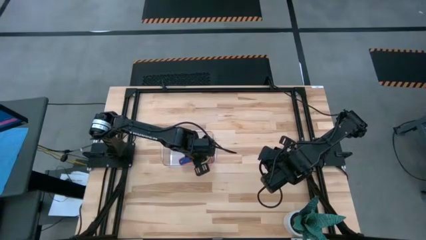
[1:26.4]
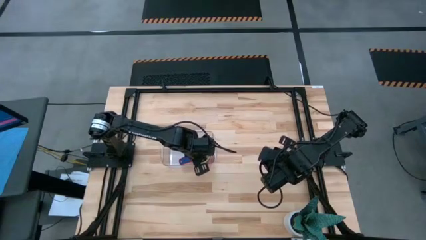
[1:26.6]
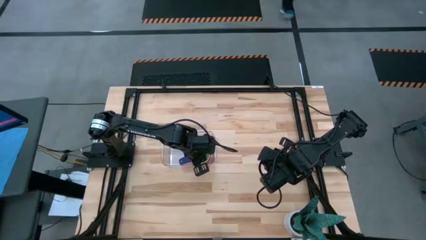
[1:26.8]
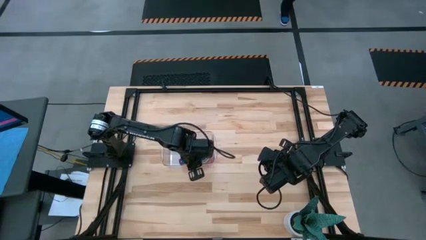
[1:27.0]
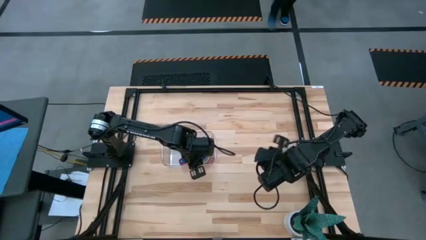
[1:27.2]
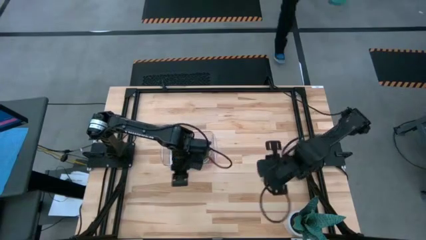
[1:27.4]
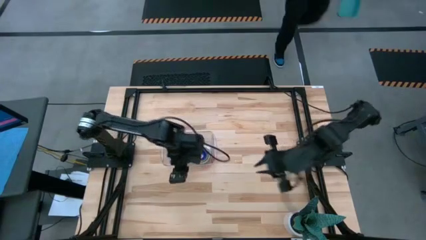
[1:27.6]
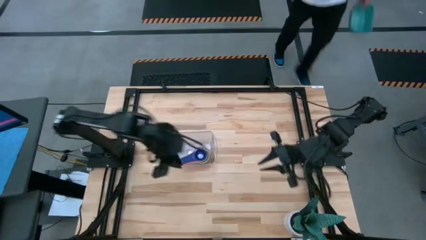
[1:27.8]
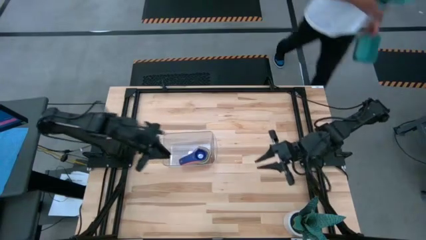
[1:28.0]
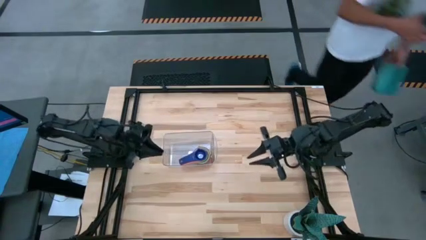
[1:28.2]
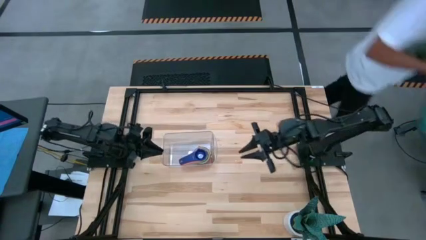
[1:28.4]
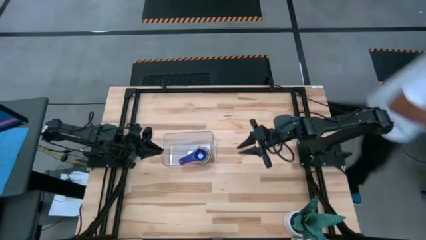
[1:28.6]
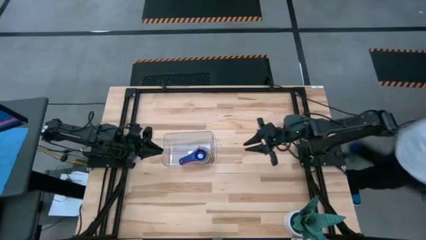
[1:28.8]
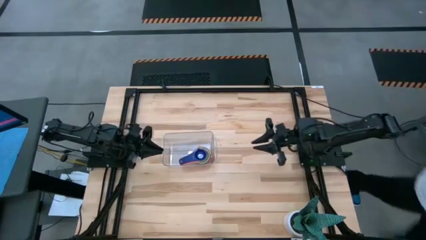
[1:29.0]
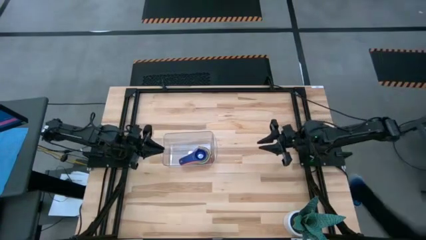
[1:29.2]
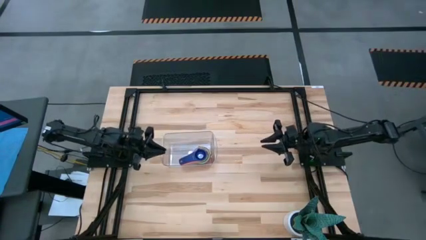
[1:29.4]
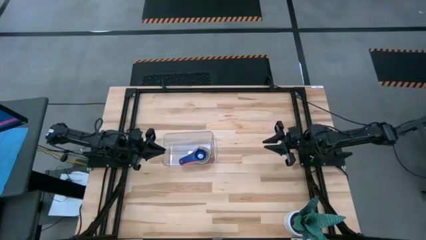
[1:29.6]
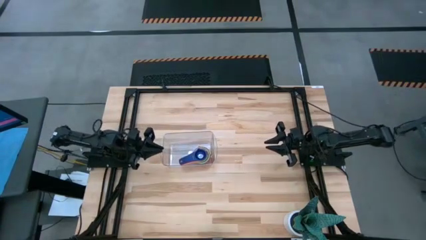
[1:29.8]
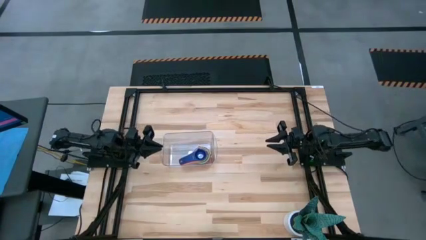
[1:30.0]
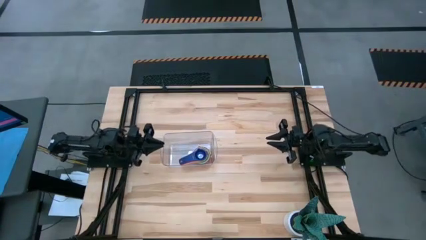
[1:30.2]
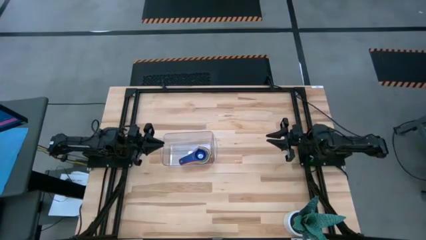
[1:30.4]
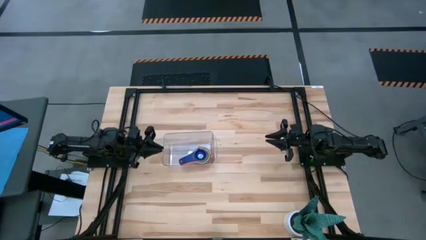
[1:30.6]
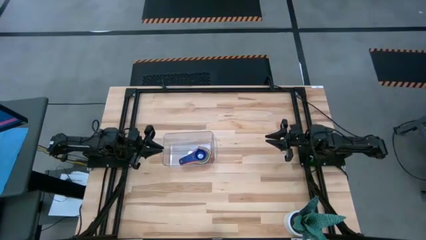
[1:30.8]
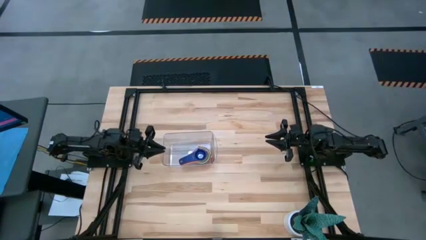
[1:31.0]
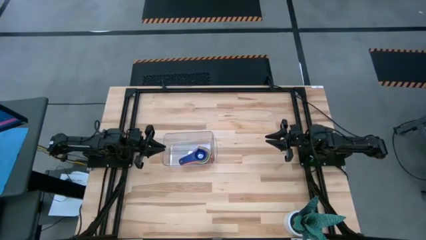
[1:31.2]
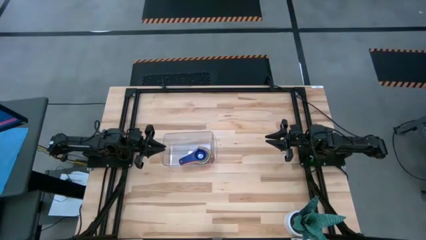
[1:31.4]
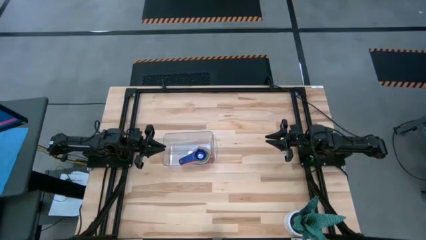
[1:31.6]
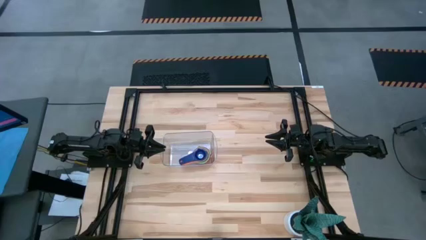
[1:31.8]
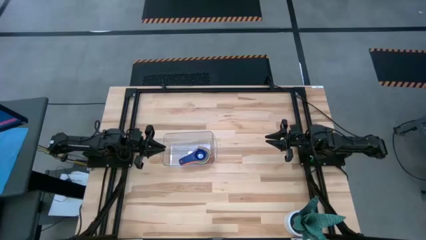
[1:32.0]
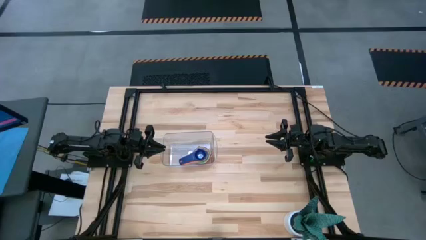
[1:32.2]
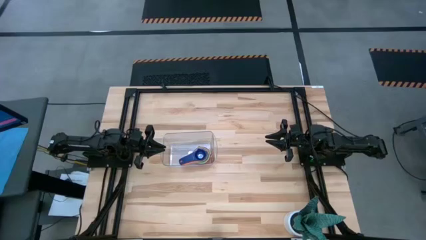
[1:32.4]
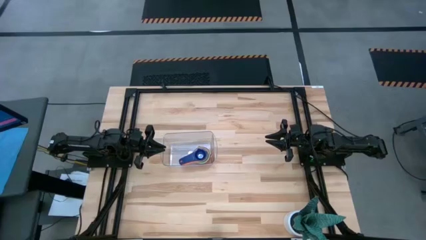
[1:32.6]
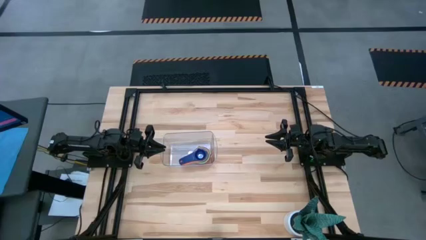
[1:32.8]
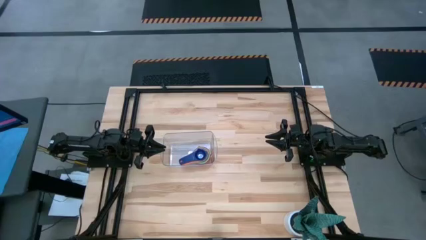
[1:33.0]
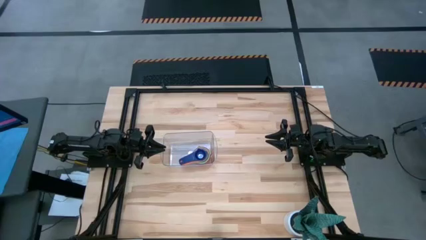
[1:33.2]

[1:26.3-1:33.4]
Task: Nest measuring cups in basket
Return to Home Position

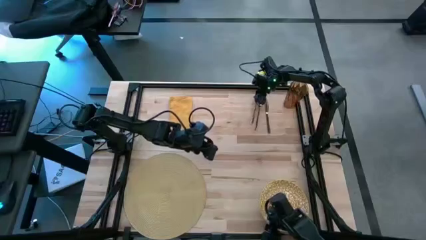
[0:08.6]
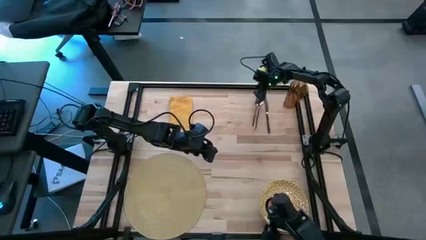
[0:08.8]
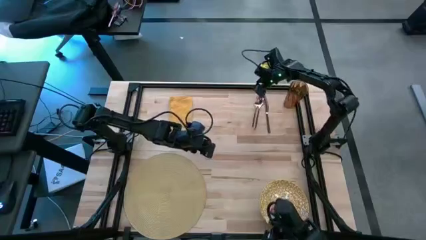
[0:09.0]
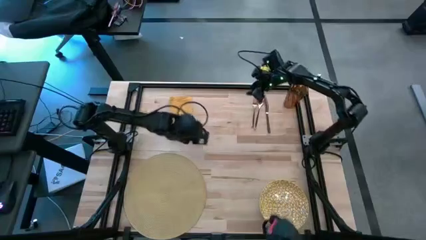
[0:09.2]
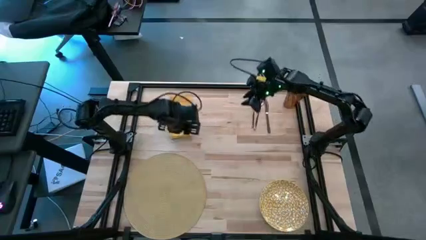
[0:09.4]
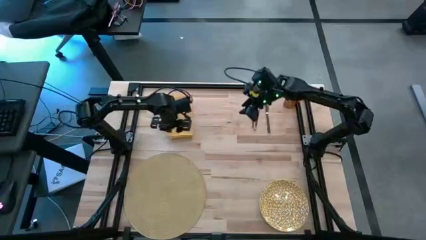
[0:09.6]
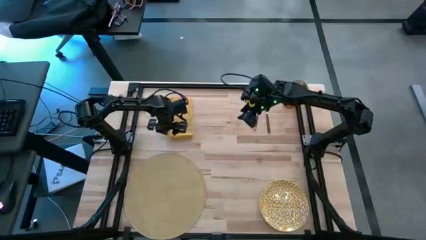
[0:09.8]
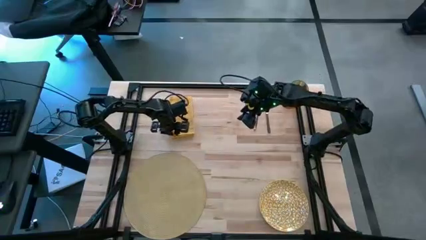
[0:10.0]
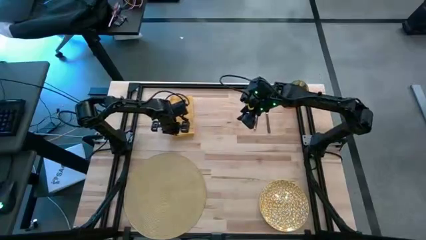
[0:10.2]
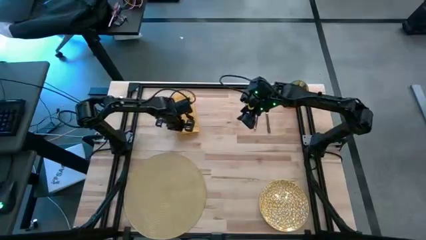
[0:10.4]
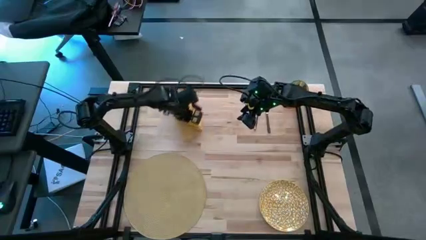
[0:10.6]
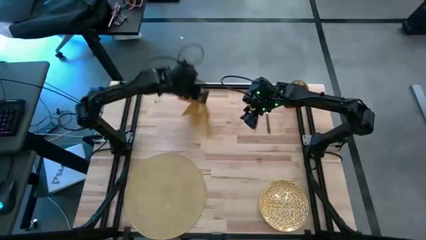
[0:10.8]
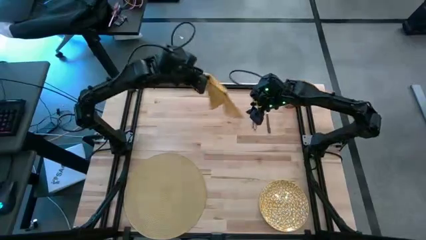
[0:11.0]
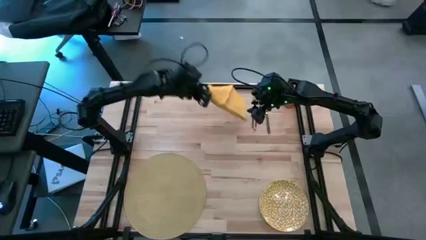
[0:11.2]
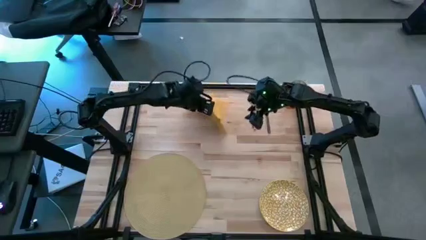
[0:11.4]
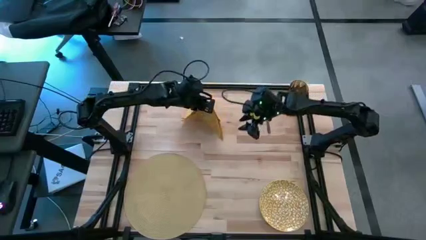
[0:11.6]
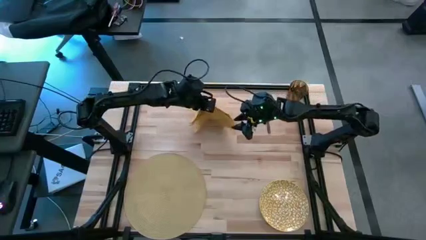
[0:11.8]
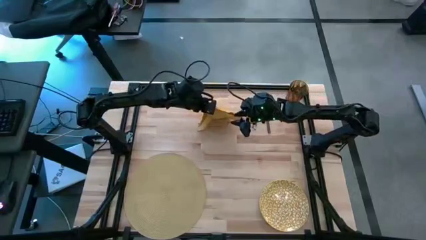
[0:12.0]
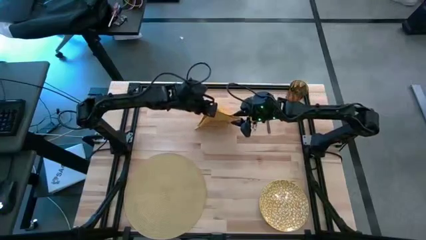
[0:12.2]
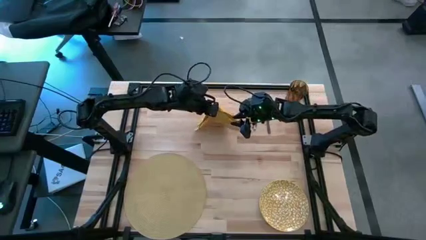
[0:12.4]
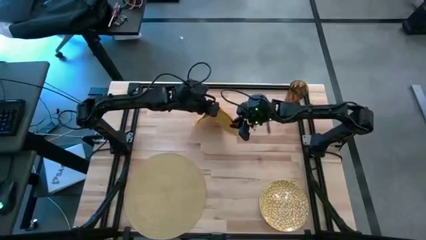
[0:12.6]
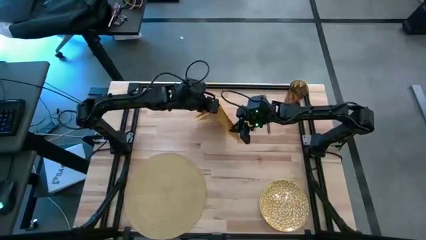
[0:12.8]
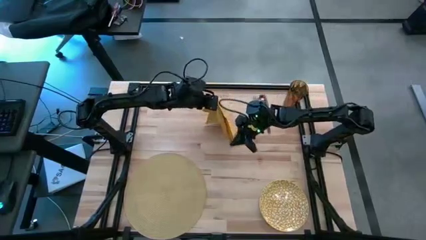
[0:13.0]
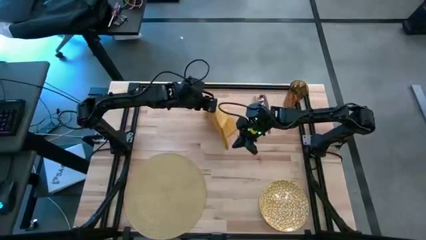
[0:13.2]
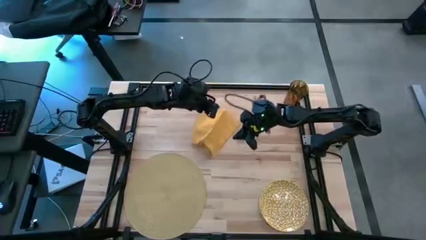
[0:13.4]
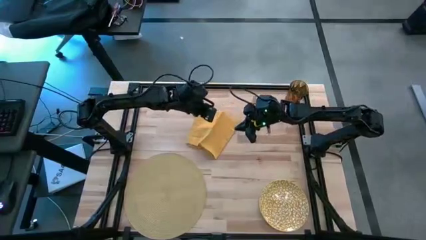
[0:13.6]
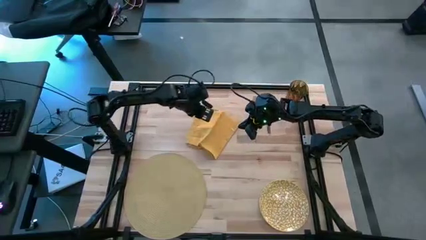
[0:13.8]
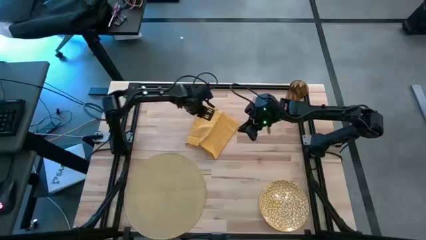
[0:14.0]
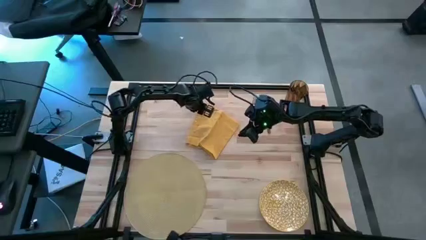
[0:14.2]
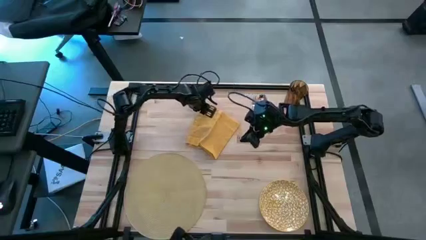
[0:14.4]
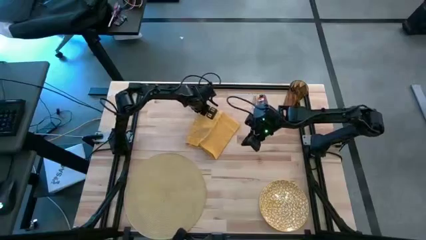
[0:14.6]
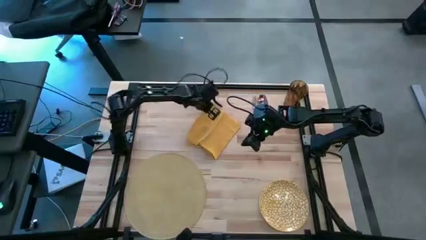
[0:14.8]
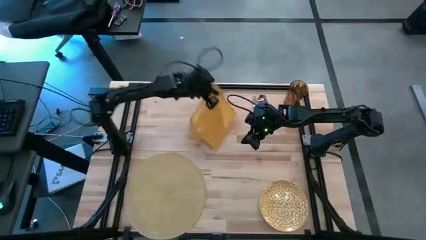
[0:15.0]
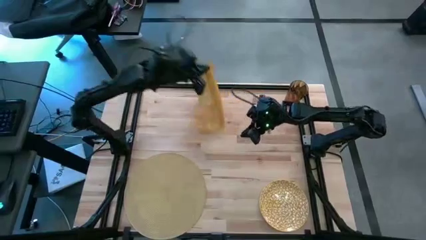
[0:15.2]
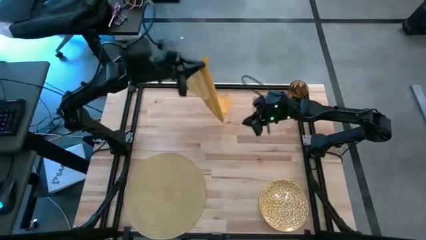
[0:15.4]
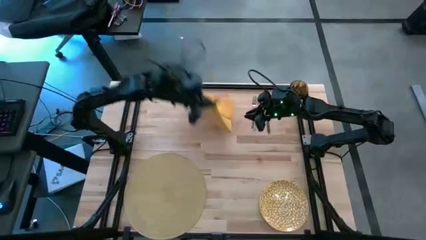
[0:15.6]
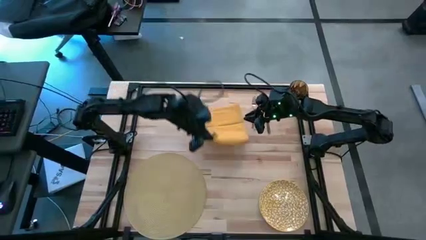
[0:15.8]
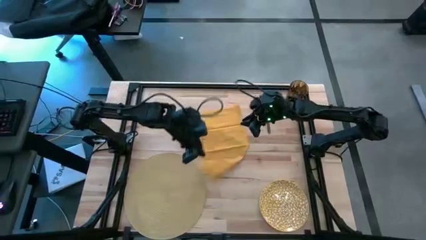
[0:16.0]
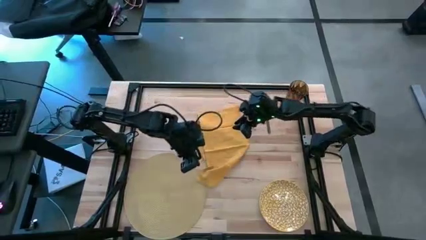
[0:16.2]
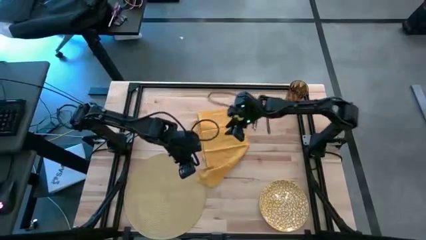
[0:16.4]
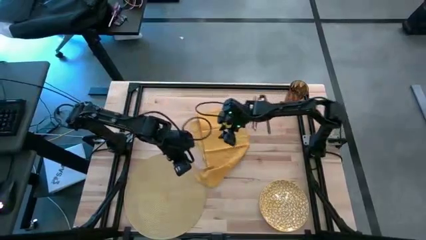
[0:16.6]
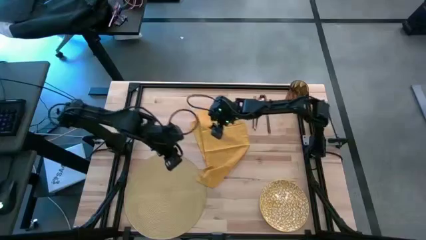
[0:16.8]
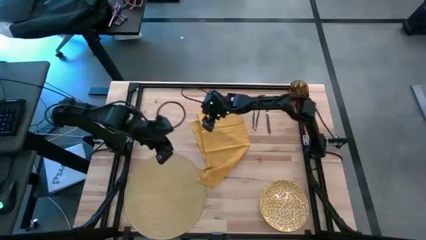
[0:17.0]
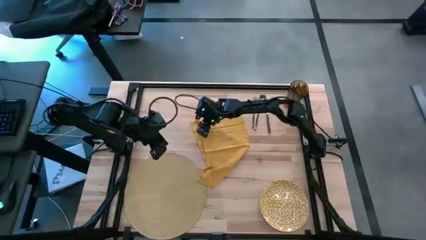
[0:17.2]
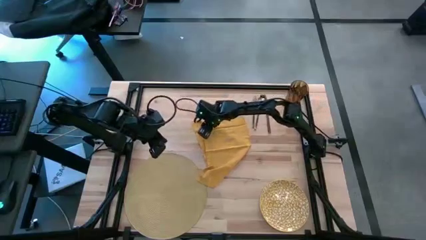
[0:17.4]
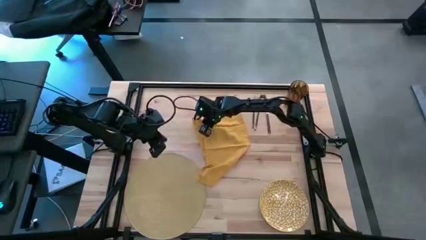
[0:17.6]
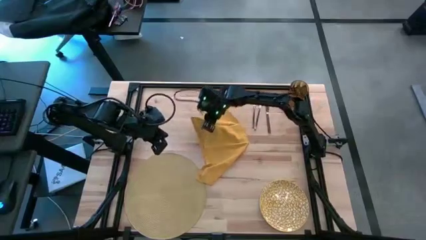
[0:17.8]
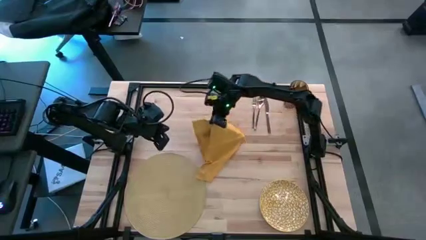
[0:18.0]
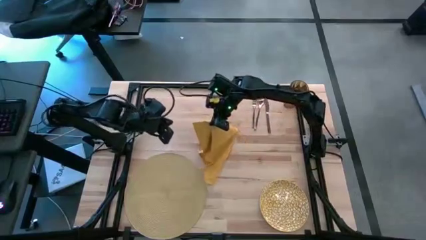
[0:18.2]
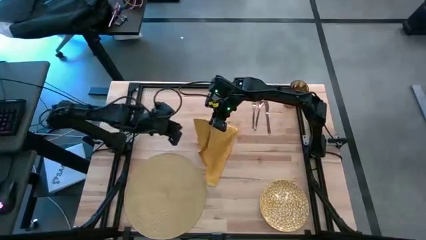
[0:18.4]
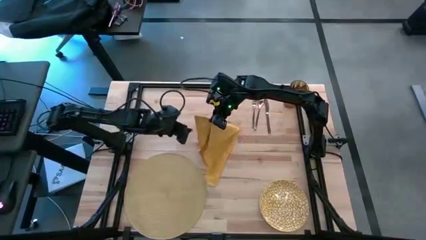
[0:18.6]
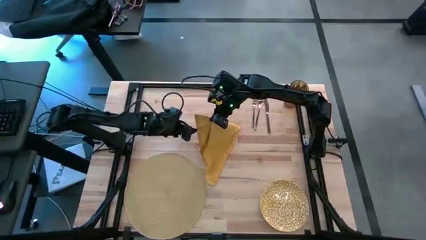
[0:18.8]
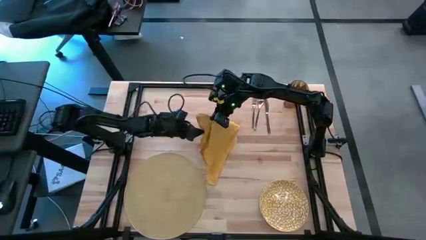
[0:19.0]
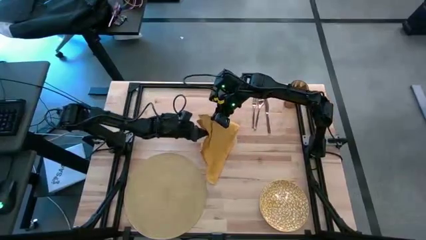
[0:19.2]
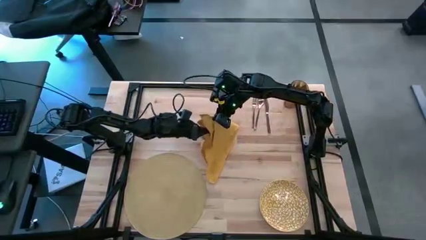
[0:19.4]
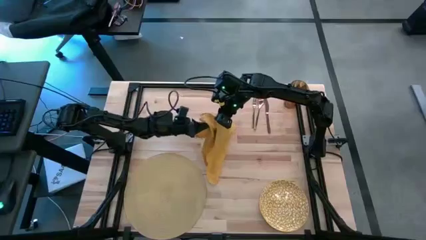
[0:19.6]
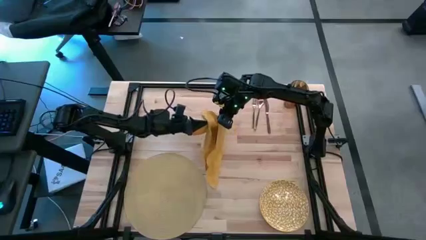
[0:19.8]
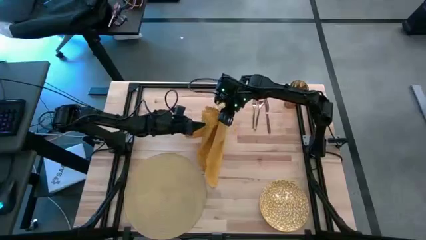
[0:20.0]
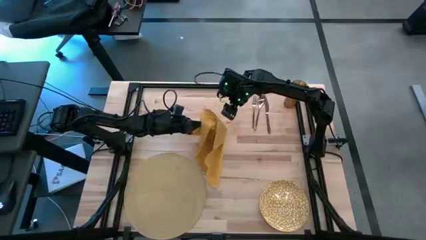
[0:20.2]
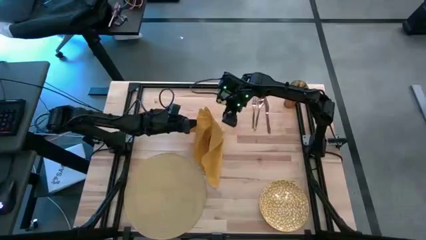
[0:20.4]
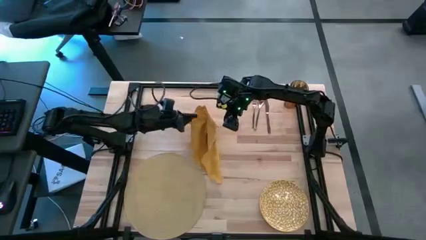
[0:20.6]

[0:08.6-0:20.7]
Task: Set table place
Fold the yellow napkin
